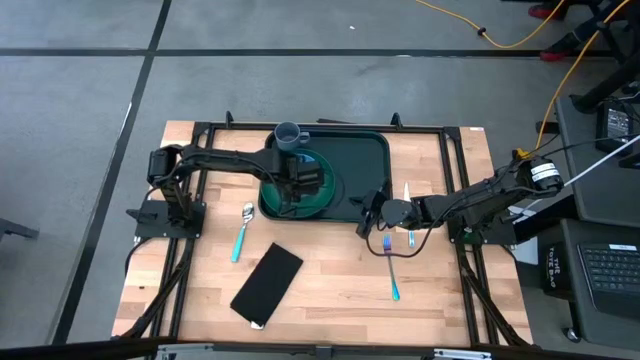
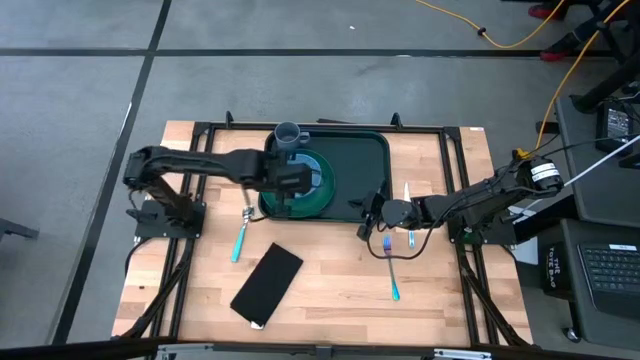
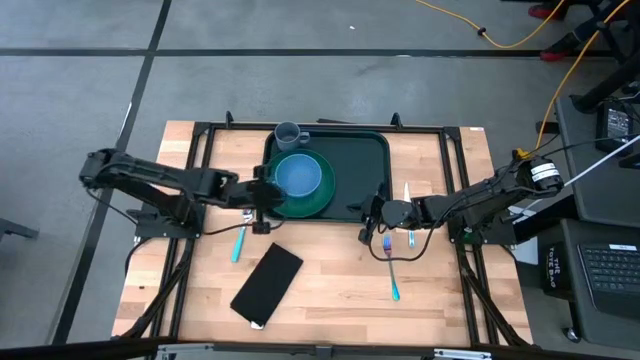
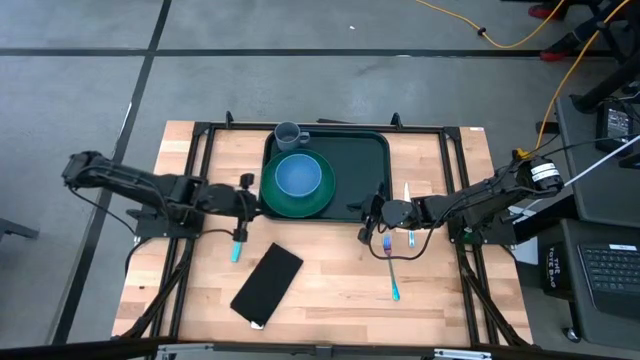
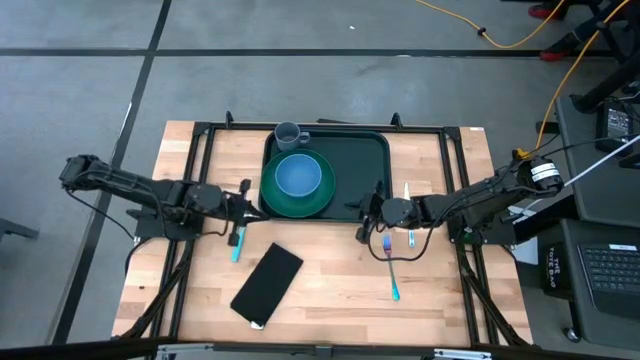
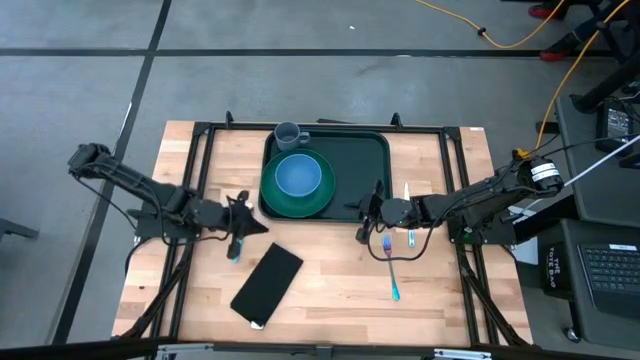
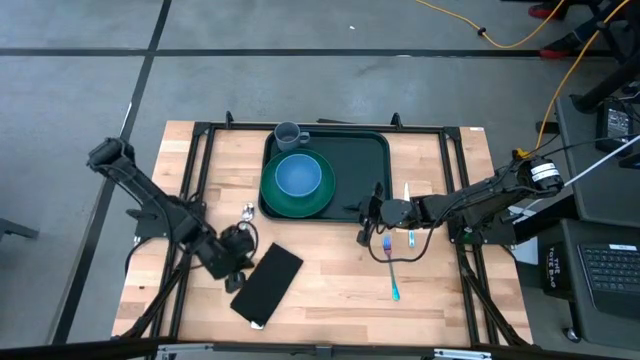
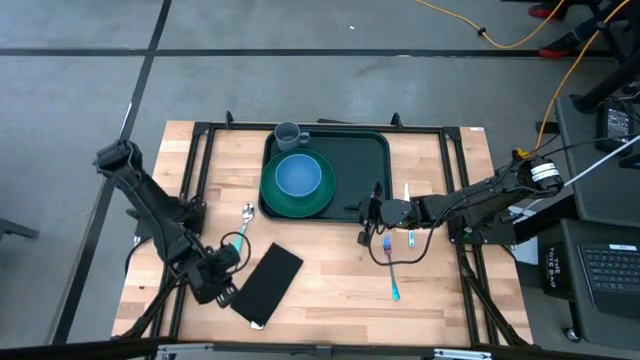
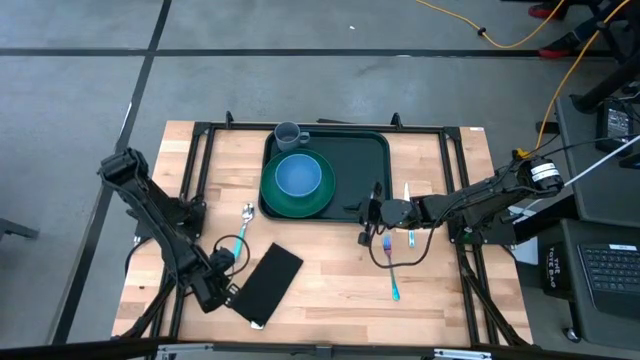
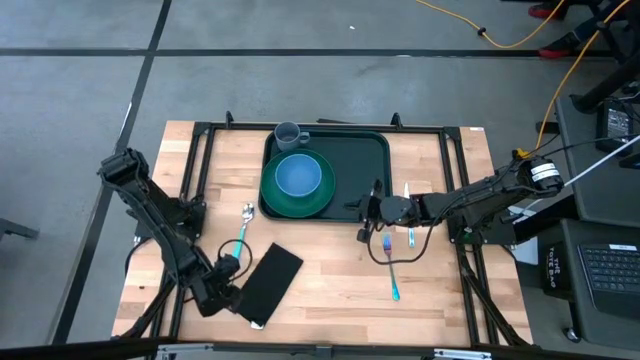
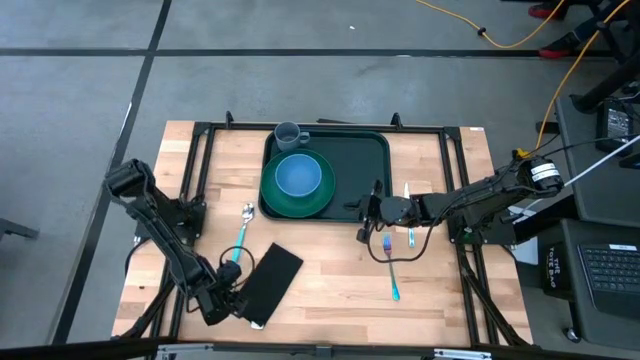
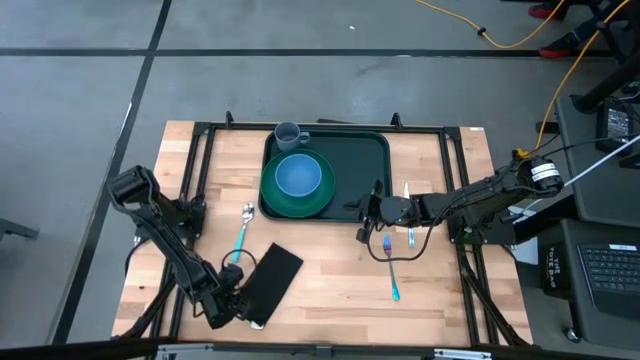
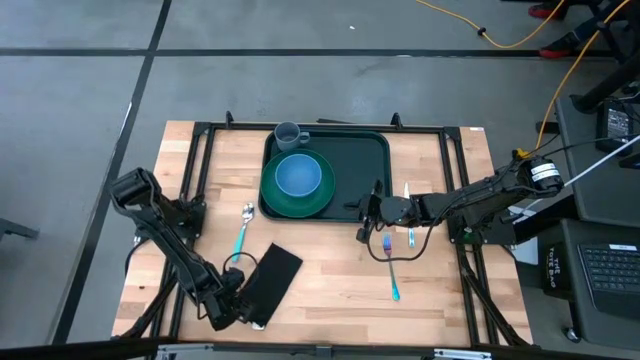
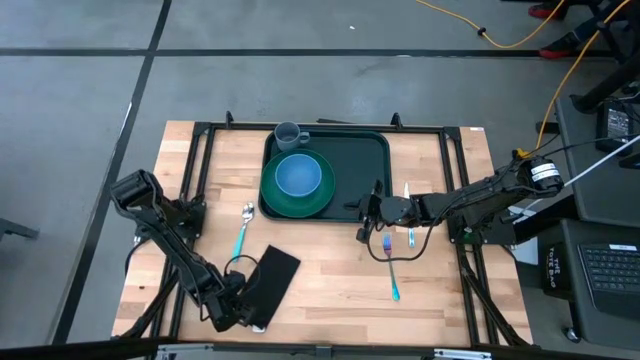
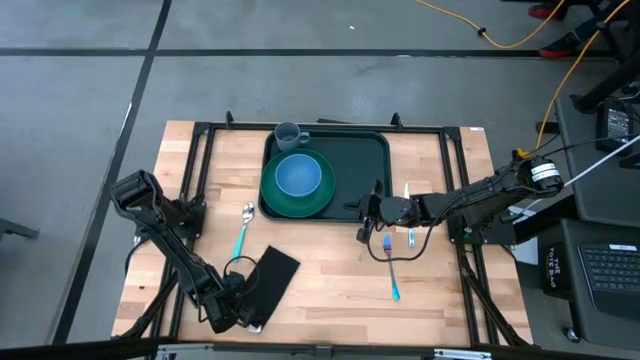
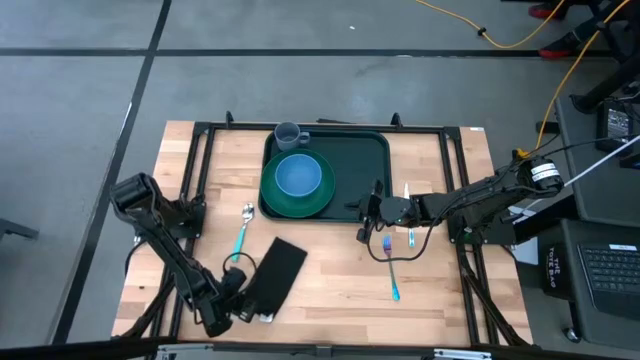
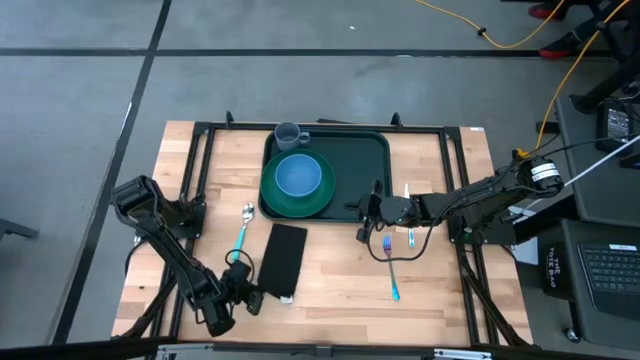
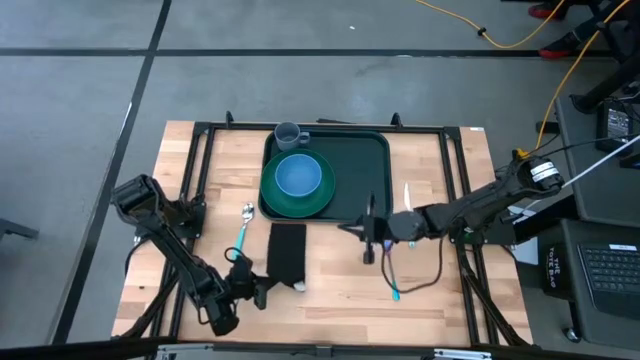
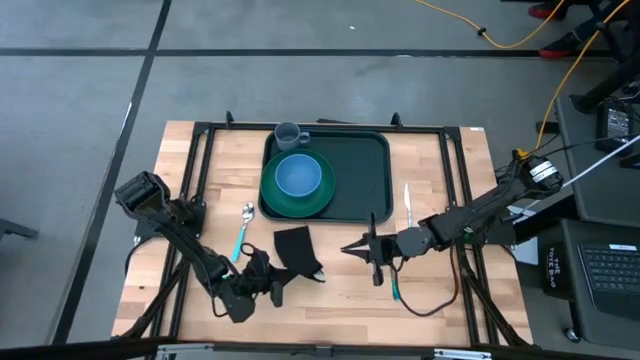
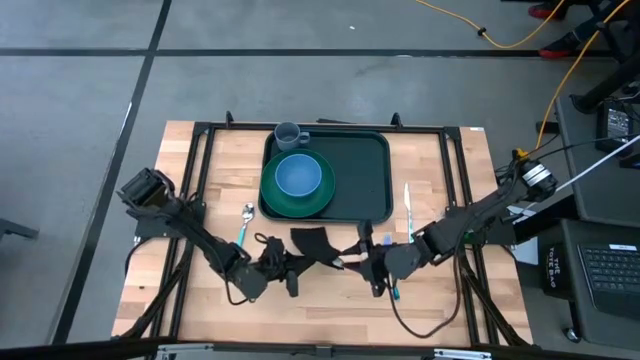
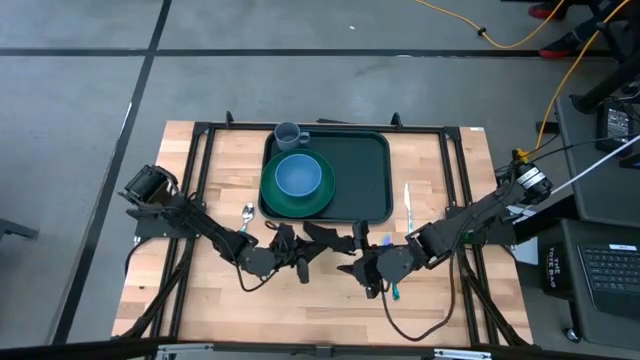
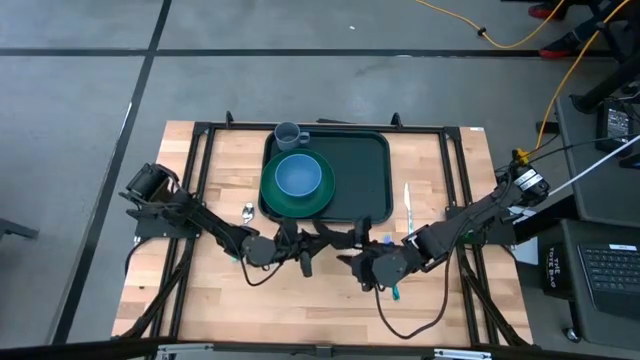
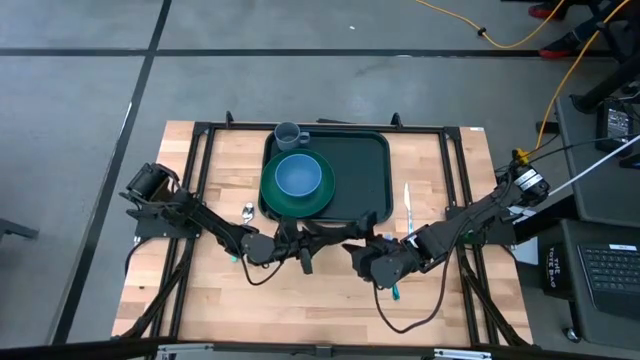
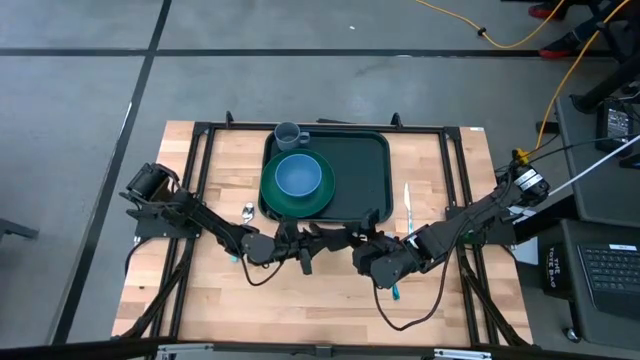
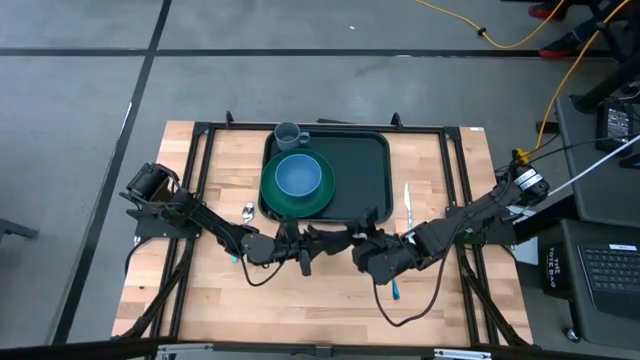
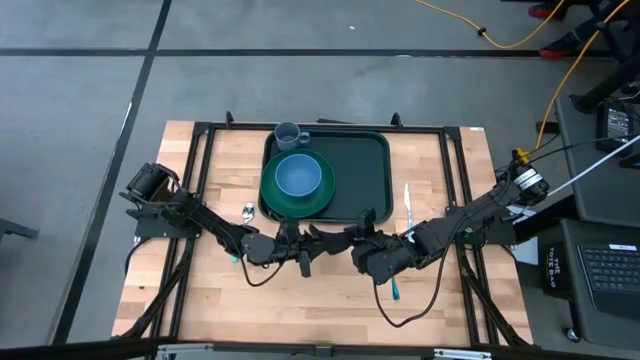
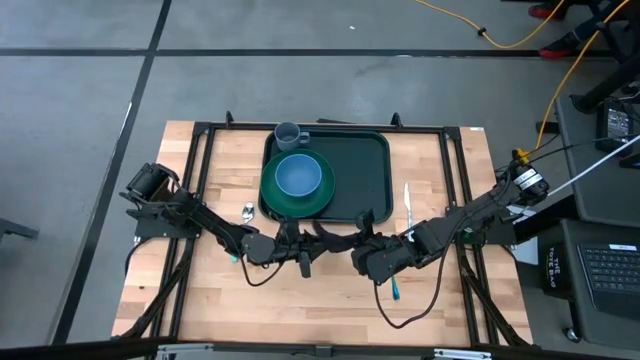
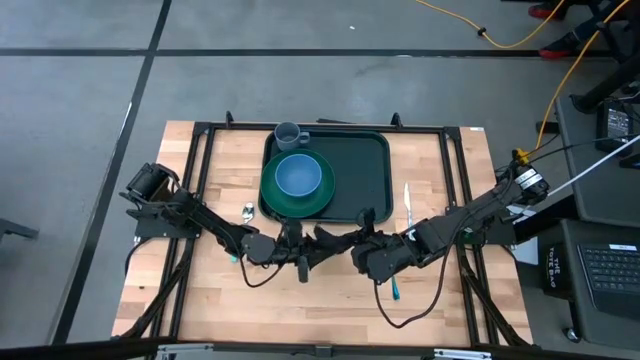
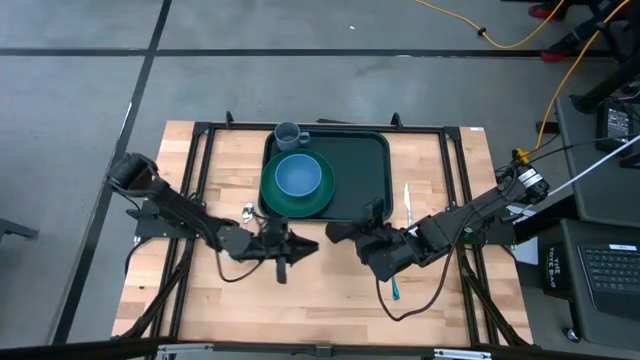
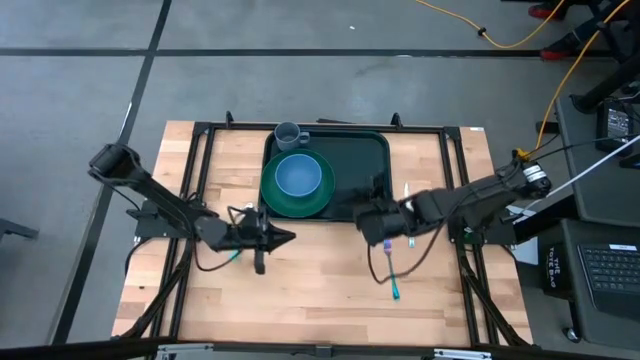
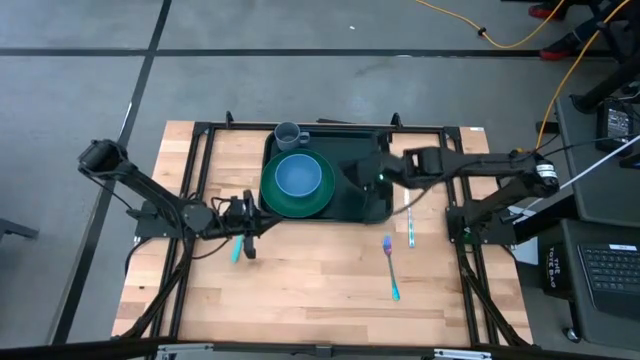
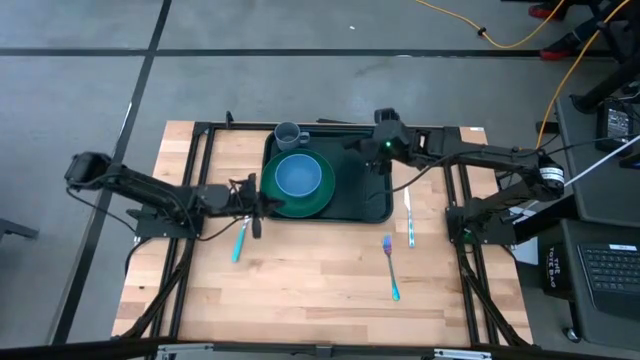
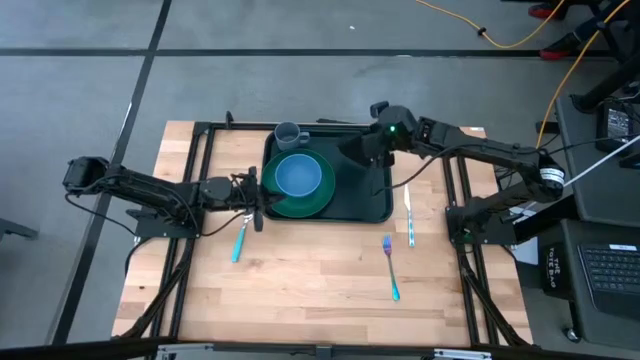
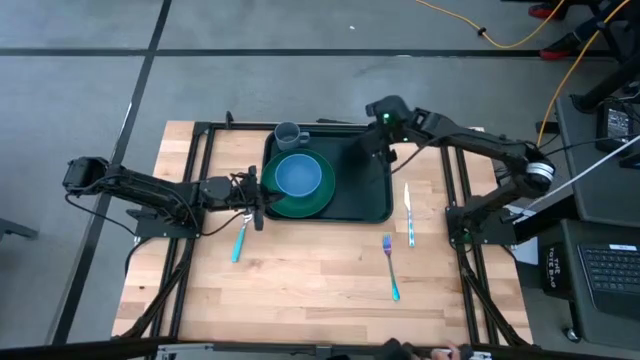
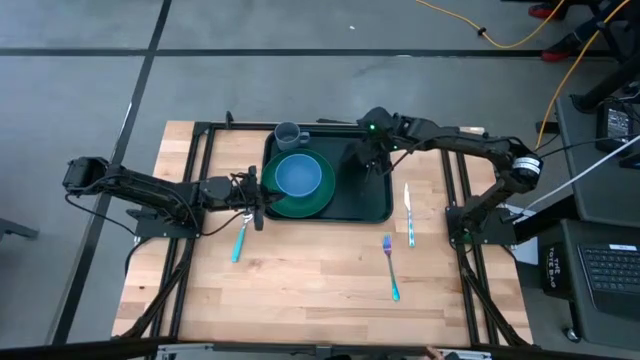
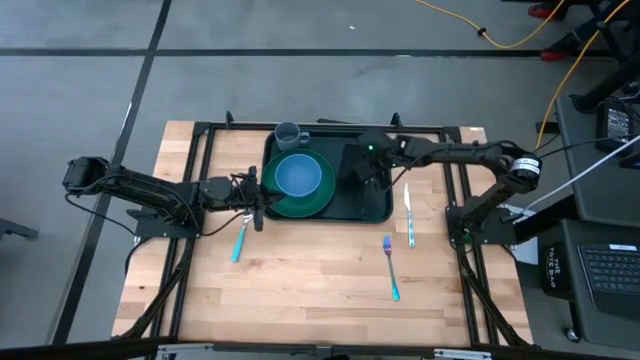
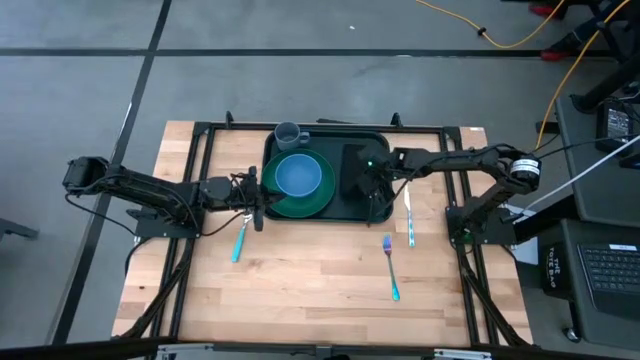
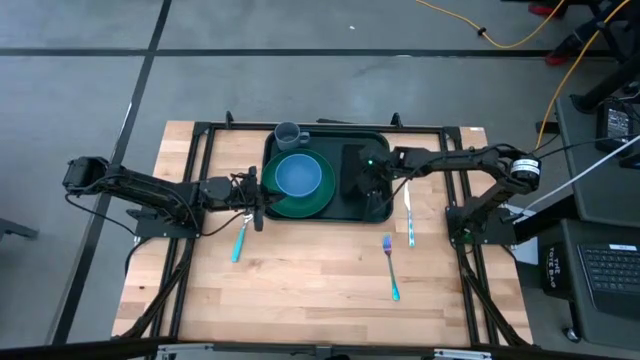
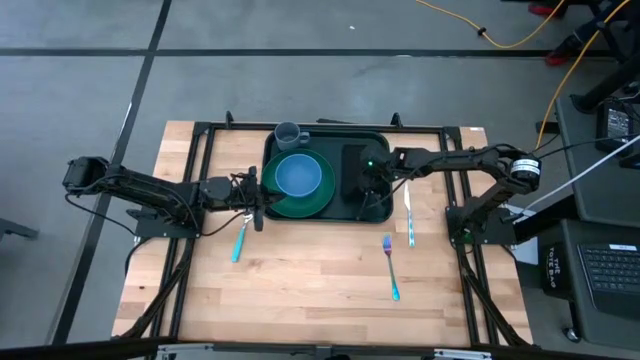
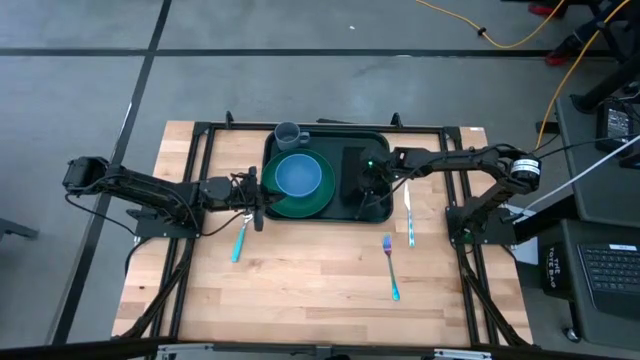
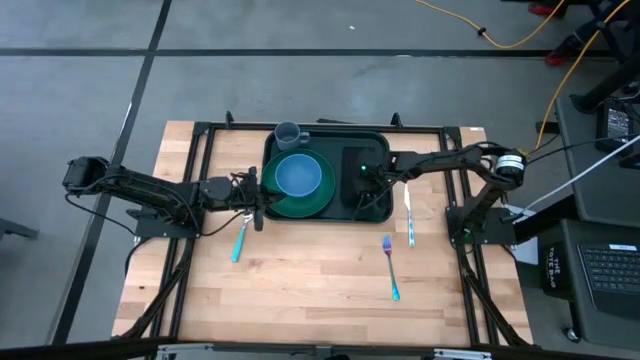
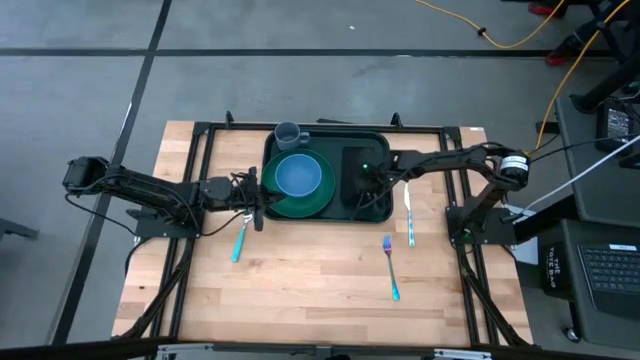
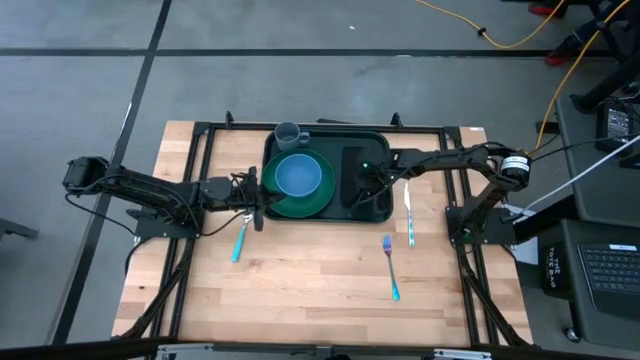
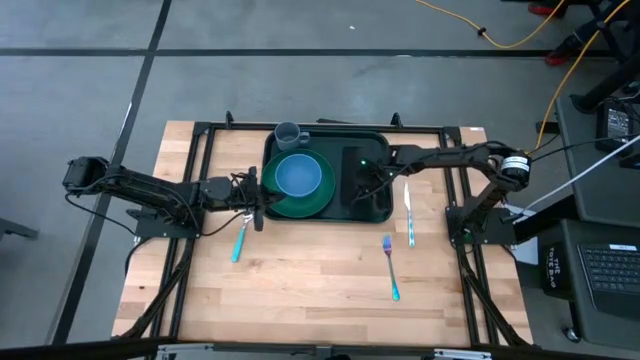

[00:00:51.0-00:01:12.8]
Task: Set up tray
Put the black napkin on the black tray to the right of the green plate
